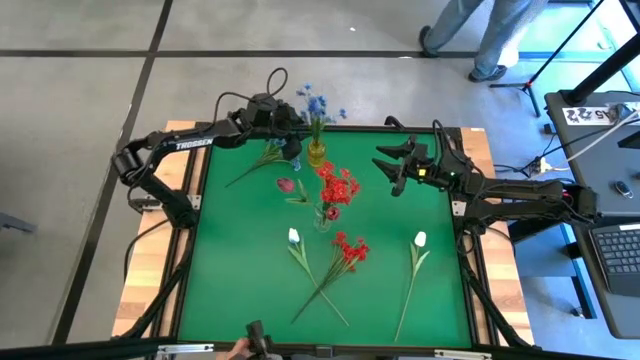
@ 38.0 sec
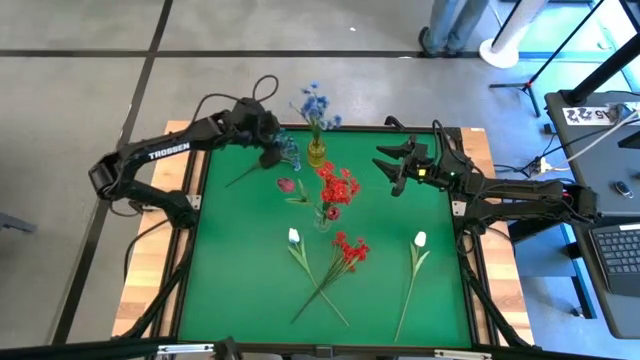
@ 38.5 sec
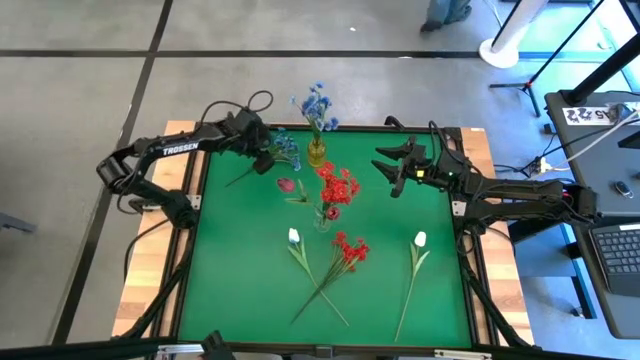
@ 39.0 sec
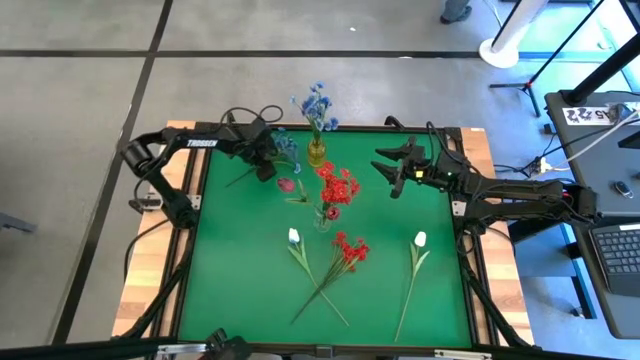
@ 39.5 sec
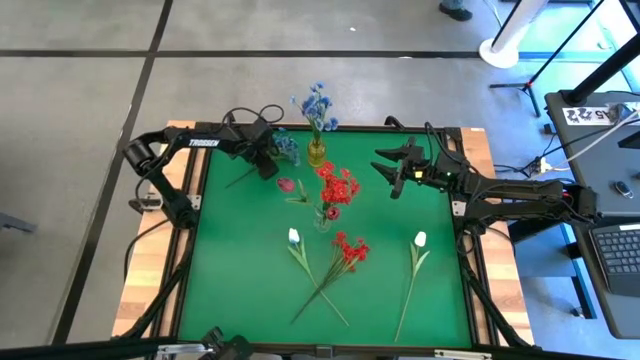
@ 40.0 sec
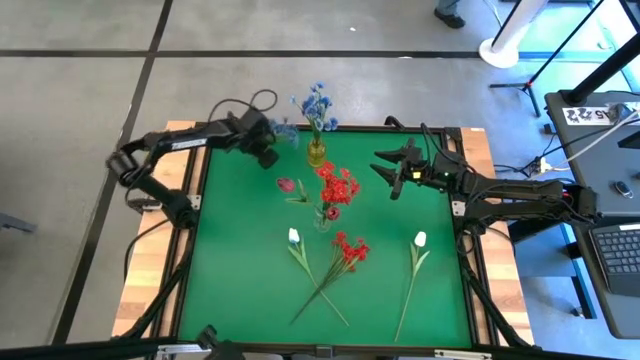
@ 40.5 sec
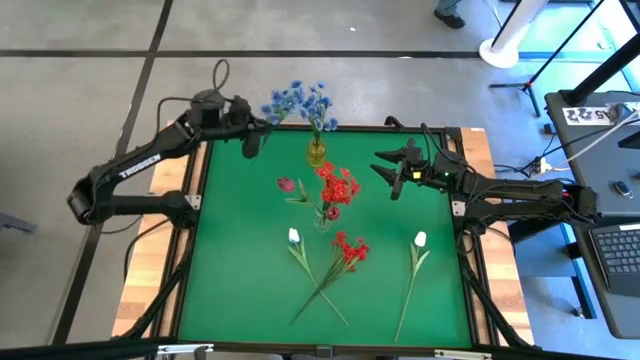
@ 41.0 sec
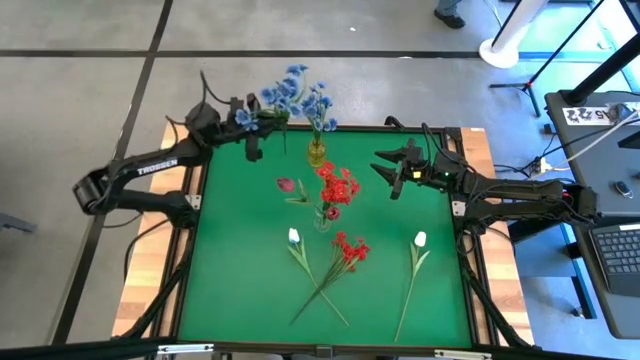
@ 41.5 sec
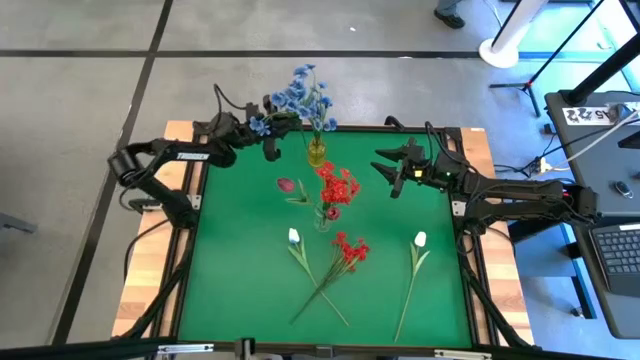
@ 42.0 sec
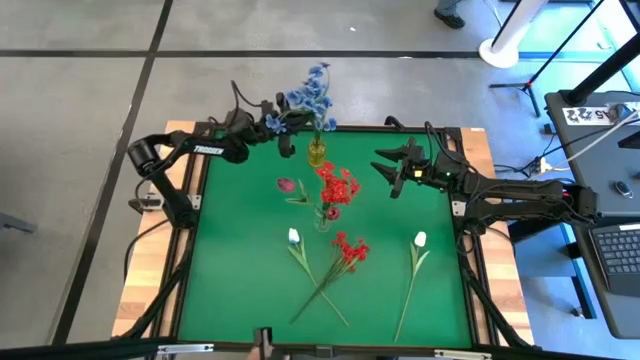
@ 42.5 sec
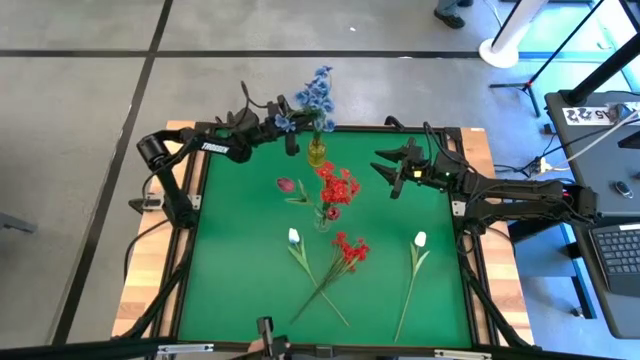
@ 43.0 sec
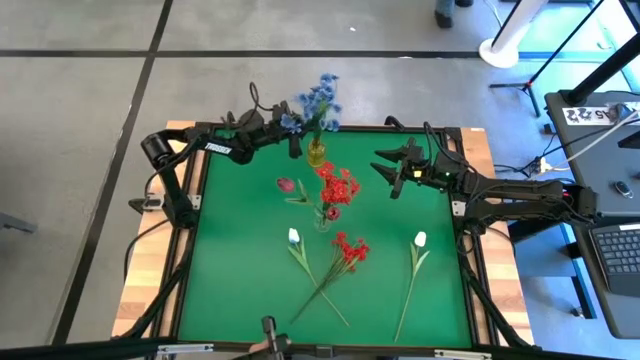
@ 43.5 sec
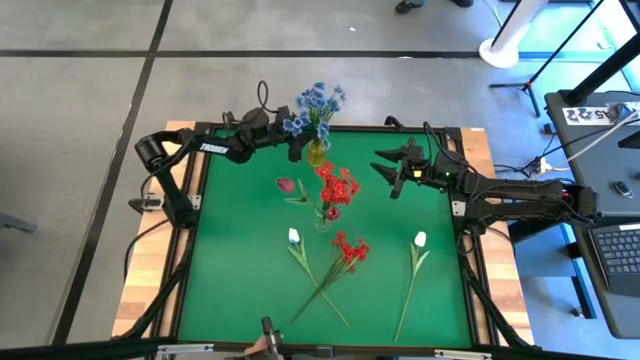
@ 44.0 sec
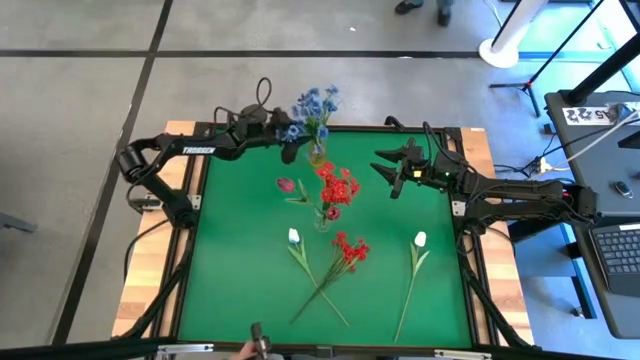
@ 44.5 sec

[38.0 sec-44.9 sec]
Task: Sort flowers into vase by color
Put the blue flower into the yellow vase

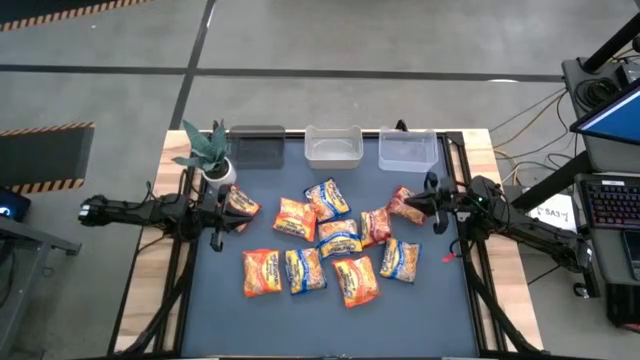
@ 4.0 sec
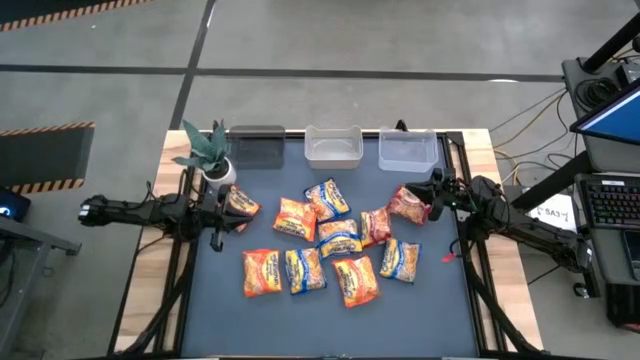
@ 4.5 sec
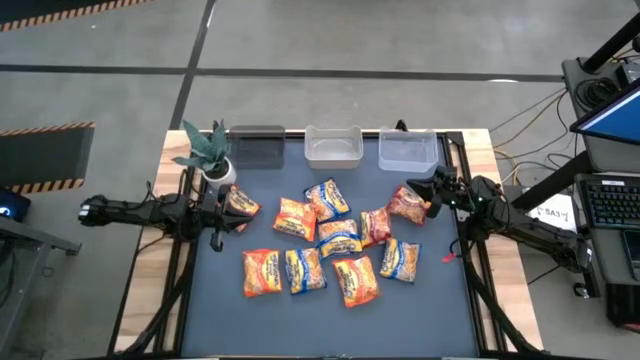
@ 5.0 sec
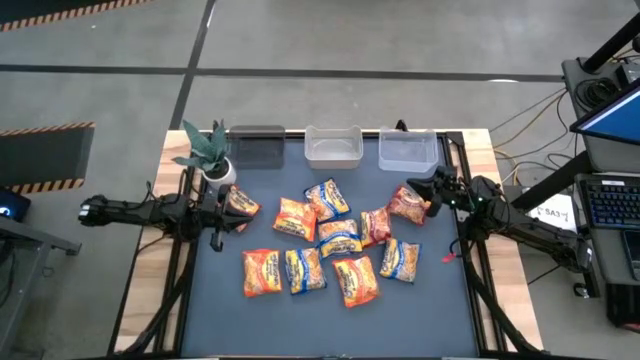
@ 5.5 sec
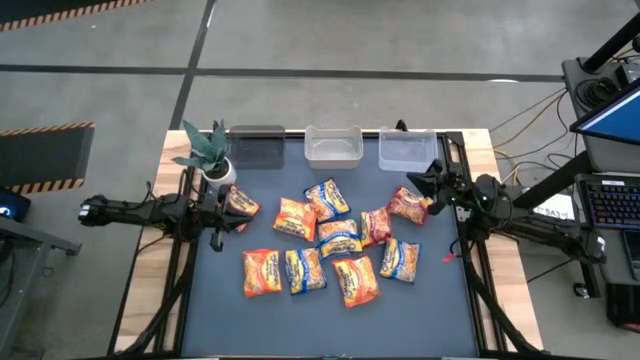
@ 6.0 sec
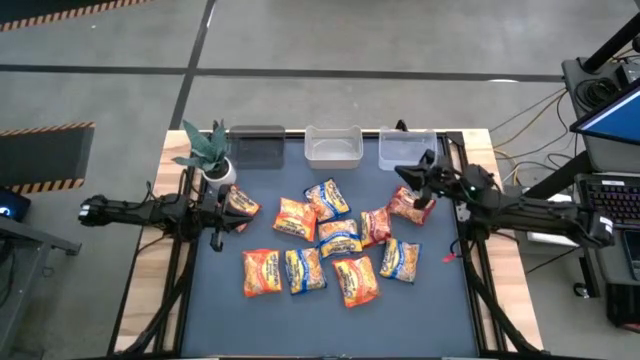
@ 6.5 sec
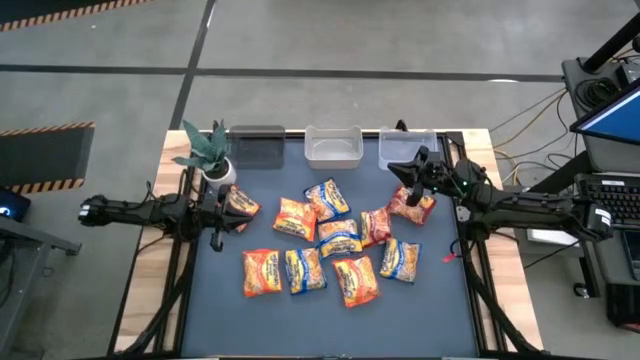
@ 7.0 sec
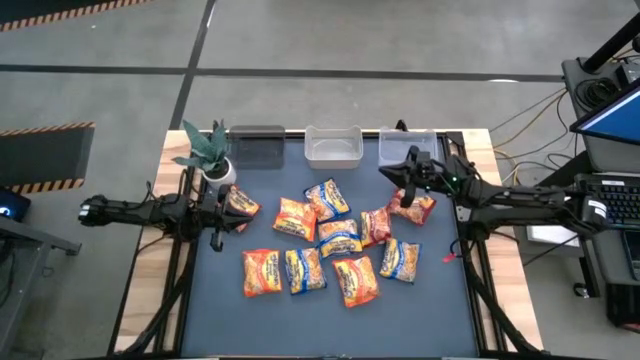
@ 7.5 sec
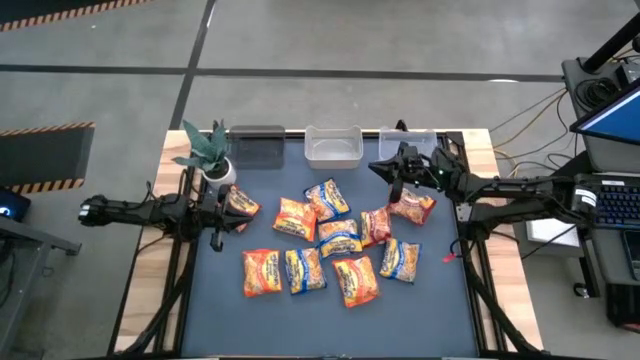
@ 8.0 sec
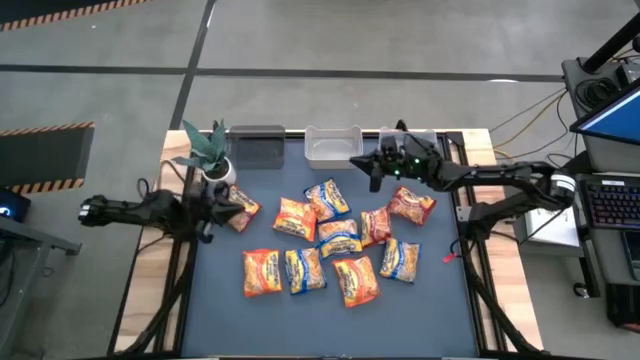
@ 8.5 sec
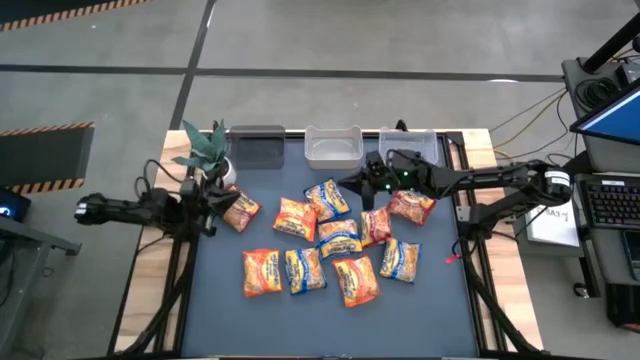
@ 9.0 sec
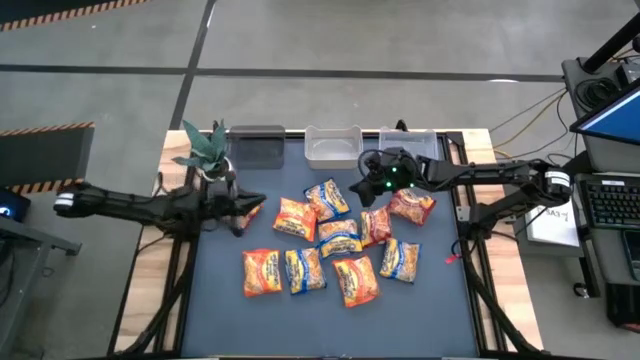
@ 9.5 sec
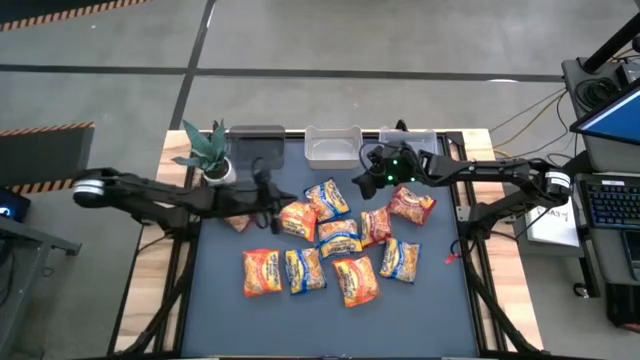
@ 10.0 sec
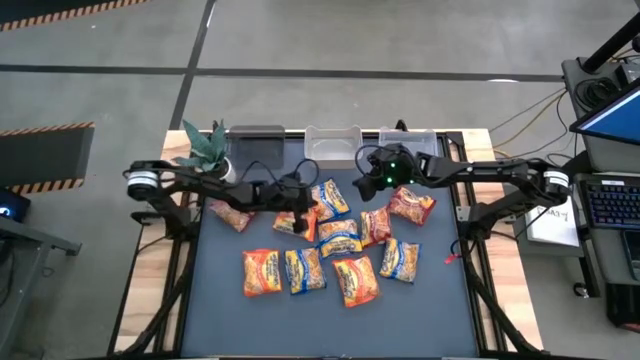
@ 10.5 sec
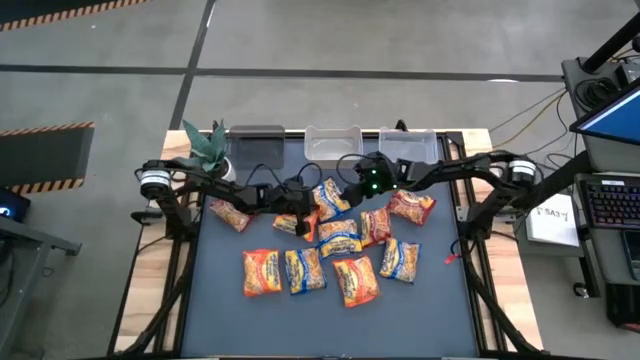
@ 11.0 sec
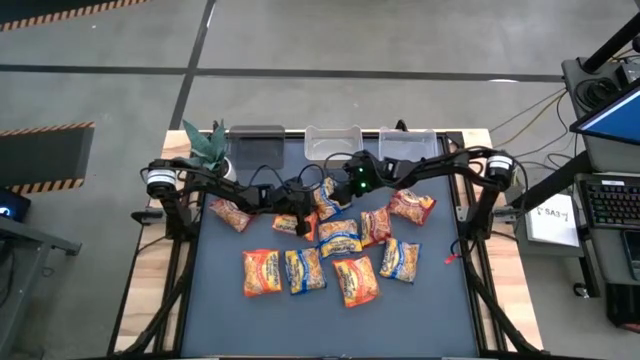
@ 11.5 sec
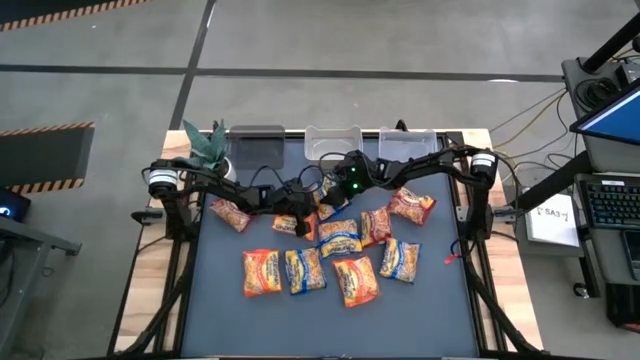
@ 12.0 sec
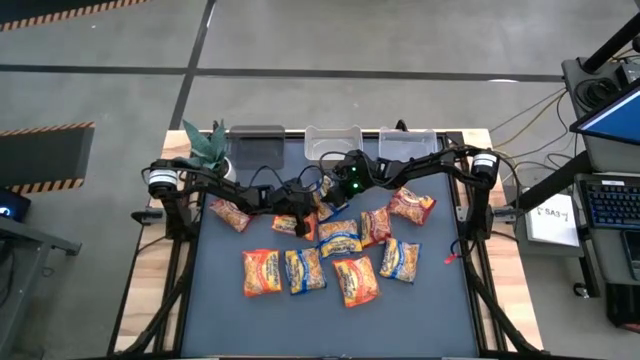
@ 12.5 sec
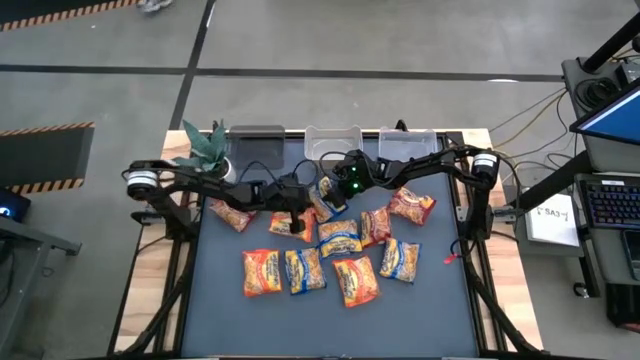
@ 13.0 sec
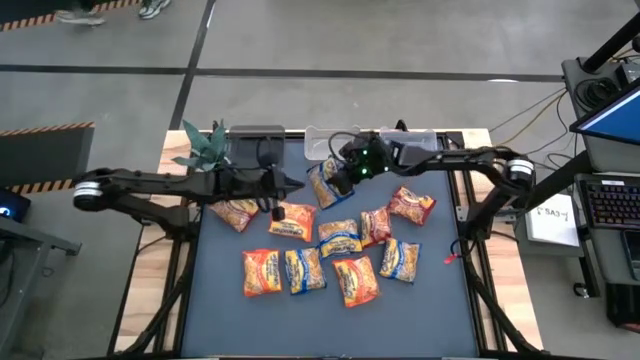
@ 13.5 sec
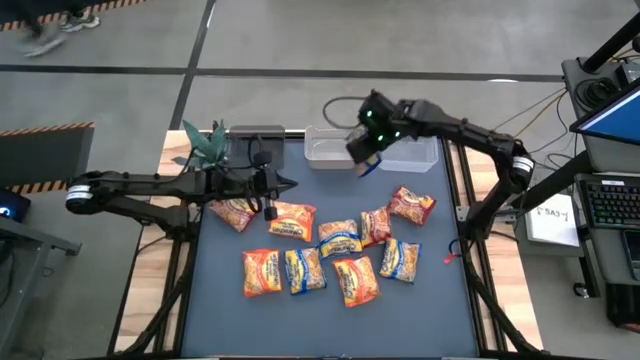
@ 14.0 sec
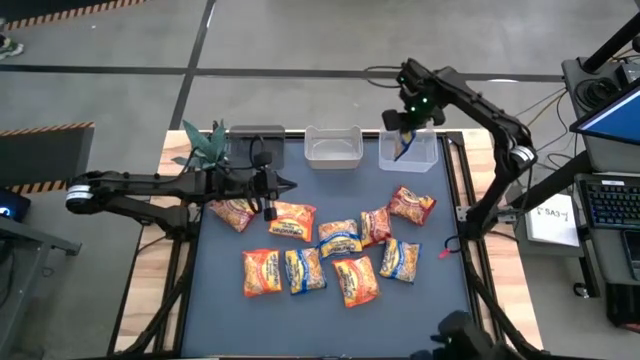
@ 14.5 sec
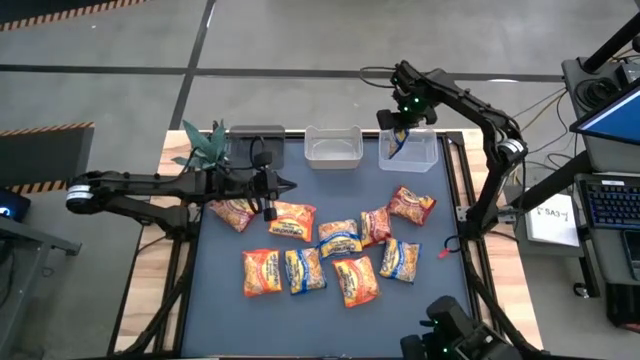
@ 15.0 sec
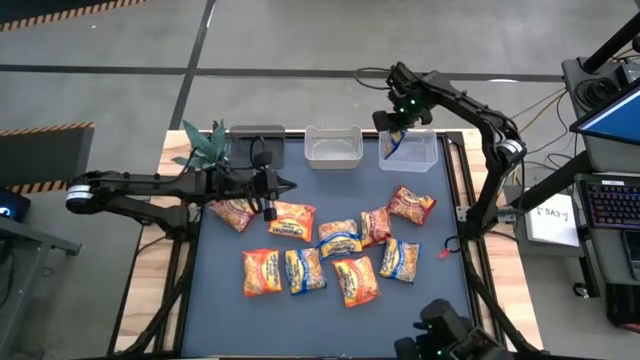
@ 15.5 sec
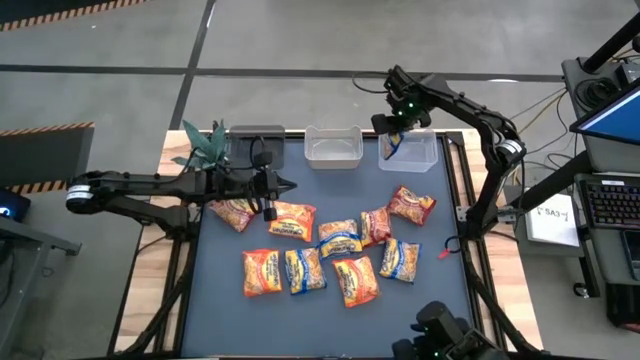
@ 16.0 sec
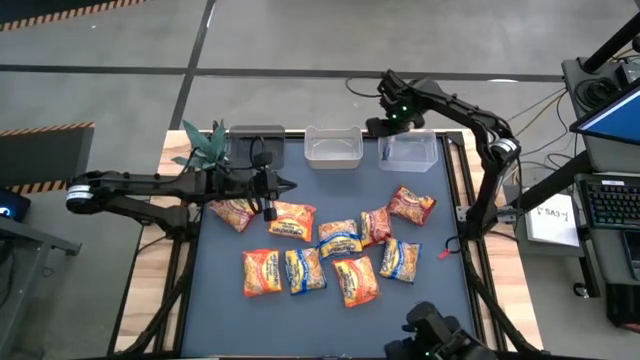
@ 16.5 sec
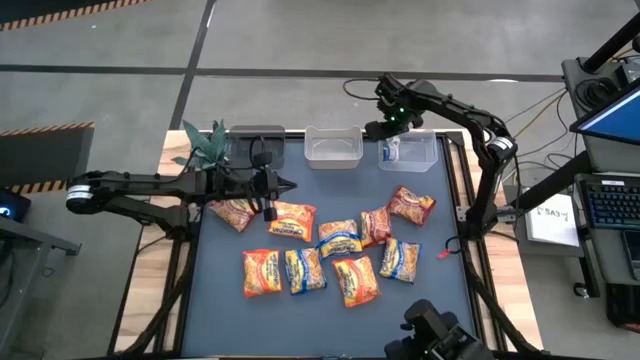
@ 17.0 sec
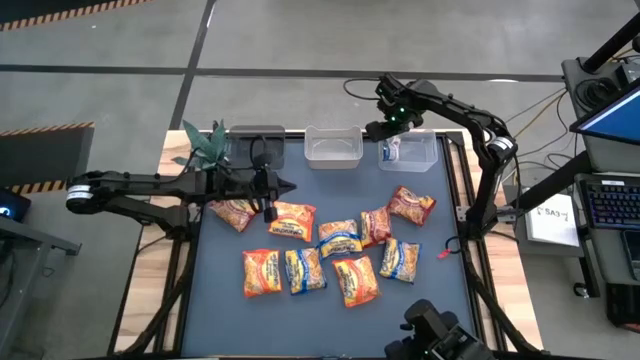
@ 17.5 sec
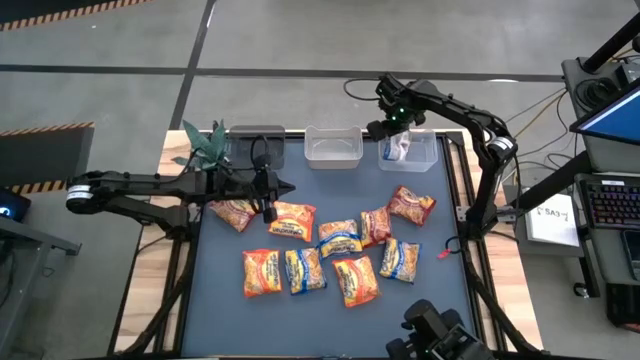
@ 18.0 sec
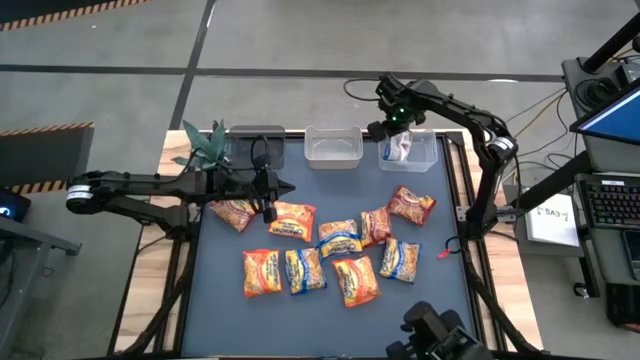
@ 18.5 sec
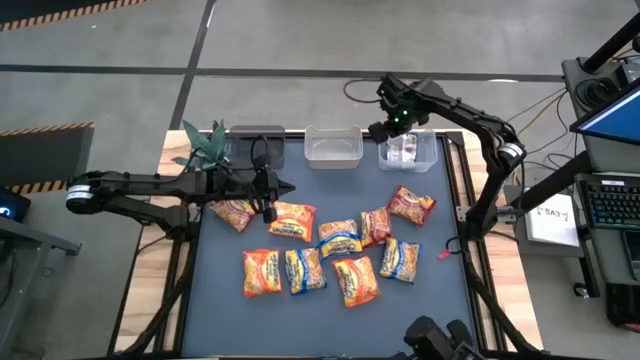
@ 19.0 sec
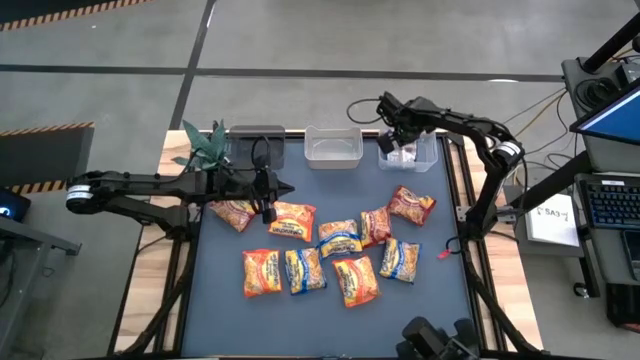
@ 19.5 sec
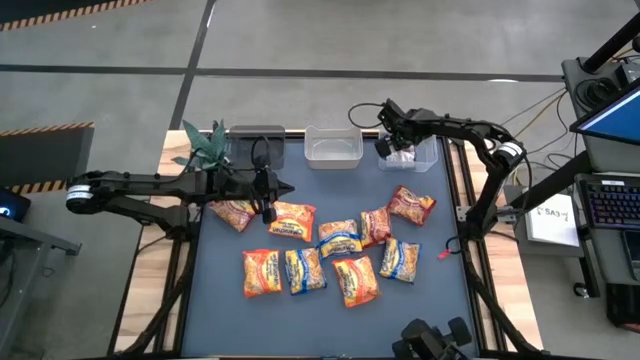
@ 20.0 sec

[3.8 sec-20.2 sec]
Task: Sort Maruchan noodles
Put the top blue noodle pack into the transparent white bin
